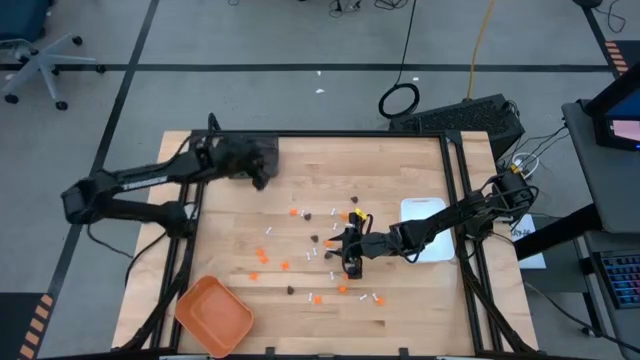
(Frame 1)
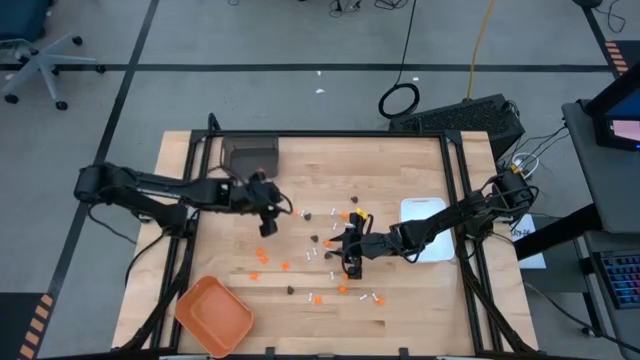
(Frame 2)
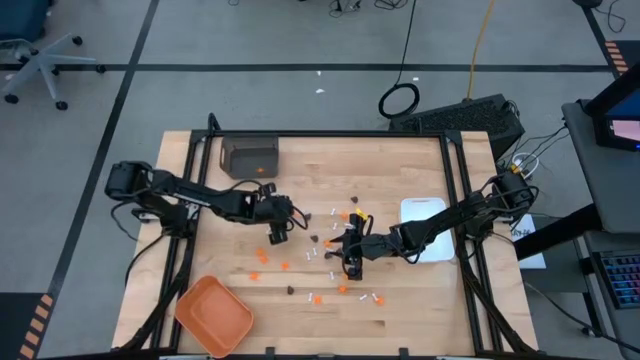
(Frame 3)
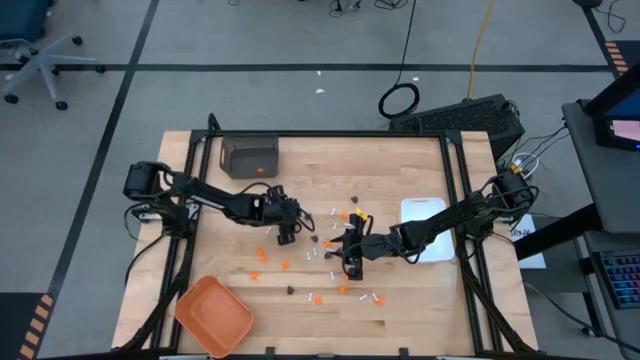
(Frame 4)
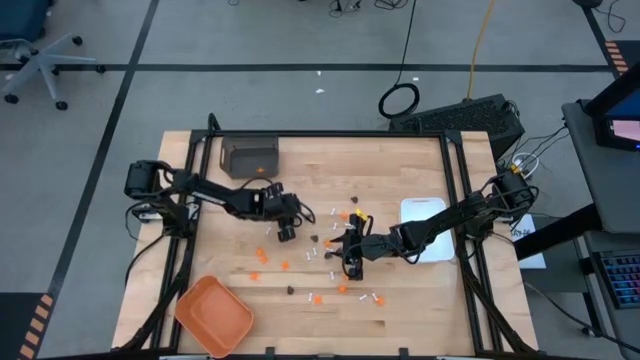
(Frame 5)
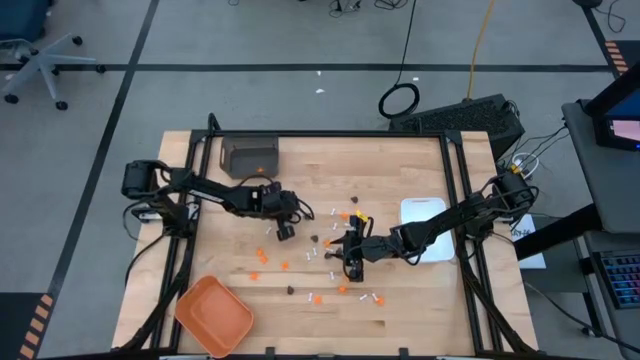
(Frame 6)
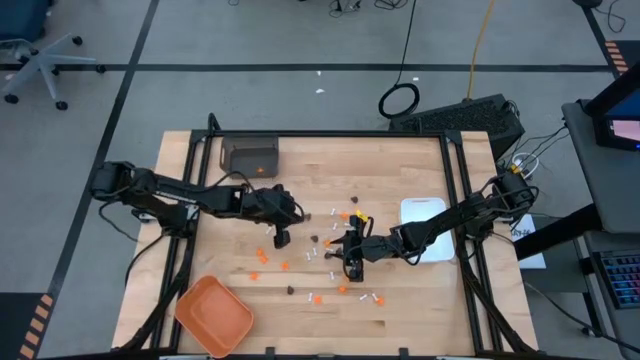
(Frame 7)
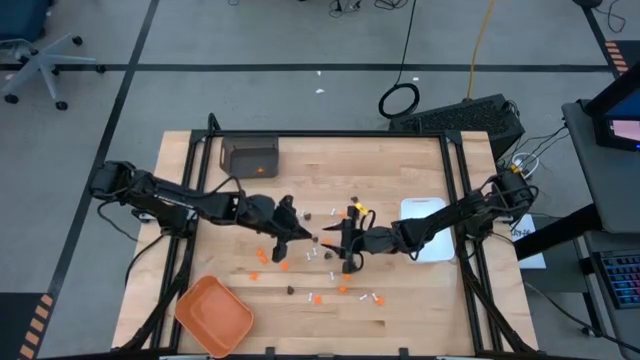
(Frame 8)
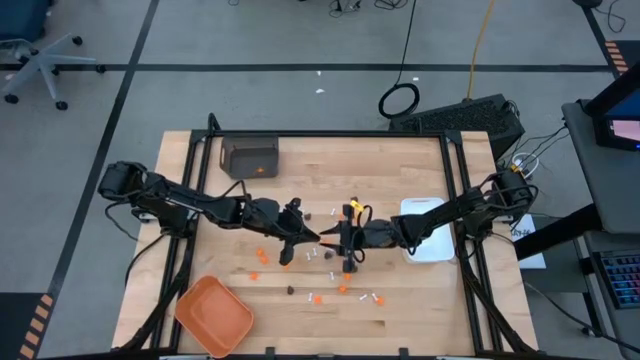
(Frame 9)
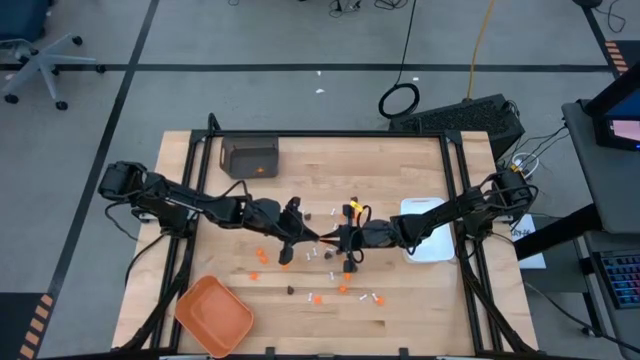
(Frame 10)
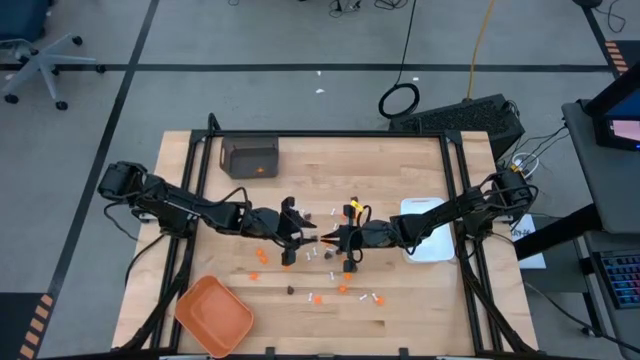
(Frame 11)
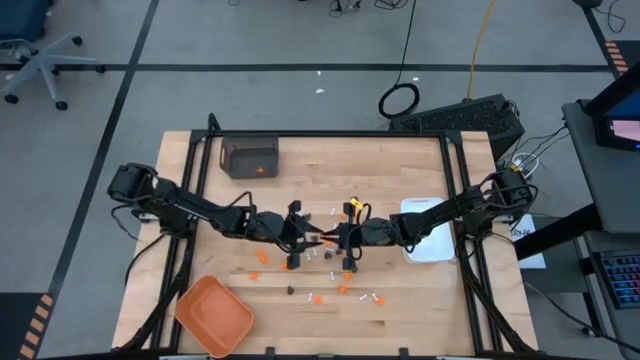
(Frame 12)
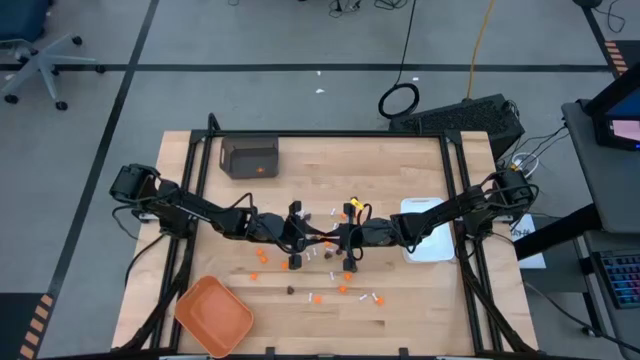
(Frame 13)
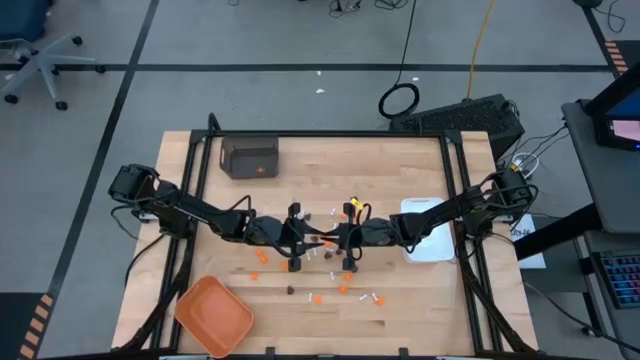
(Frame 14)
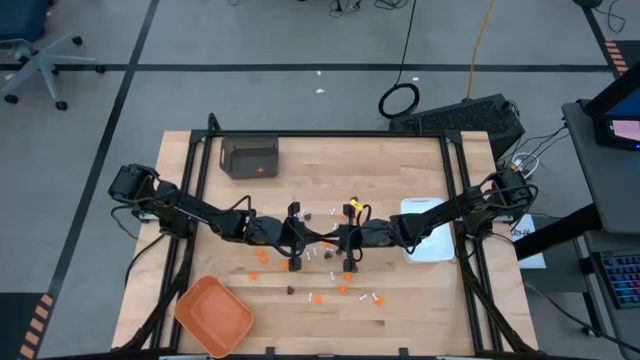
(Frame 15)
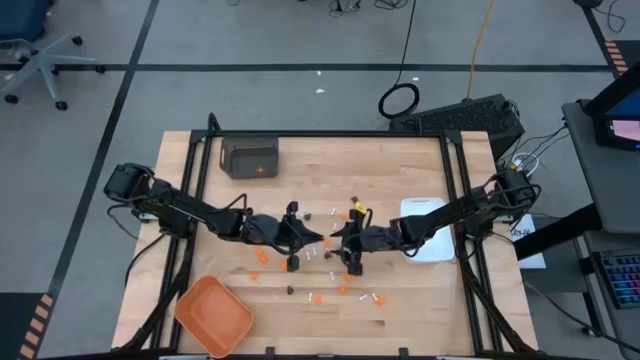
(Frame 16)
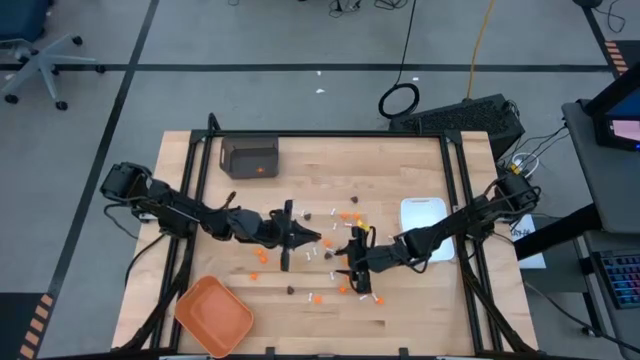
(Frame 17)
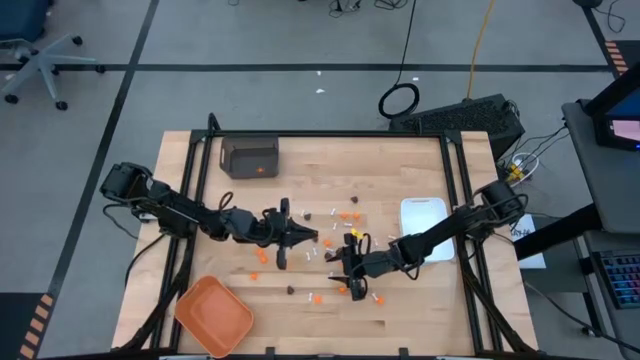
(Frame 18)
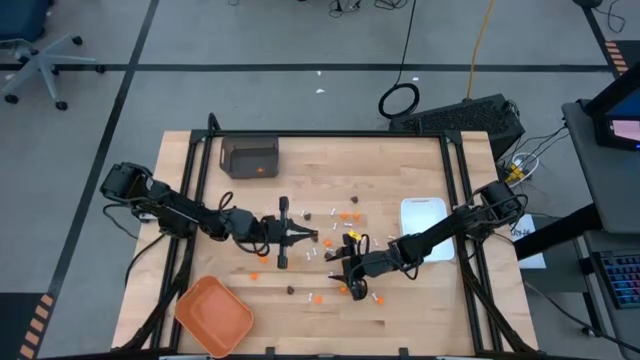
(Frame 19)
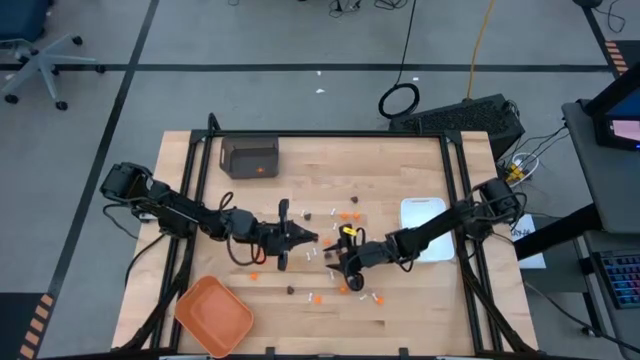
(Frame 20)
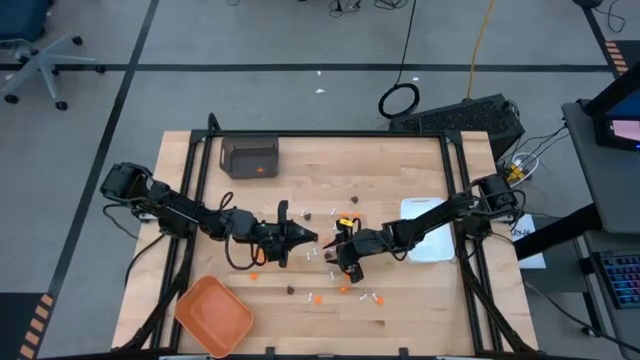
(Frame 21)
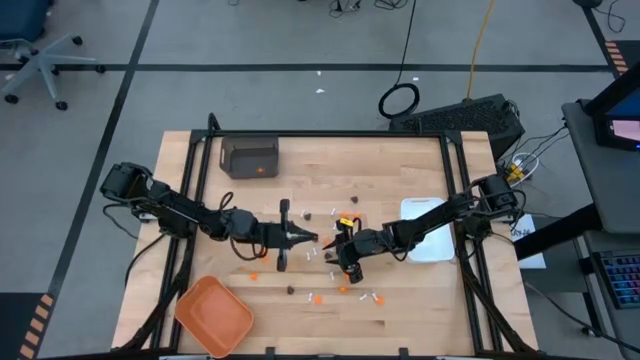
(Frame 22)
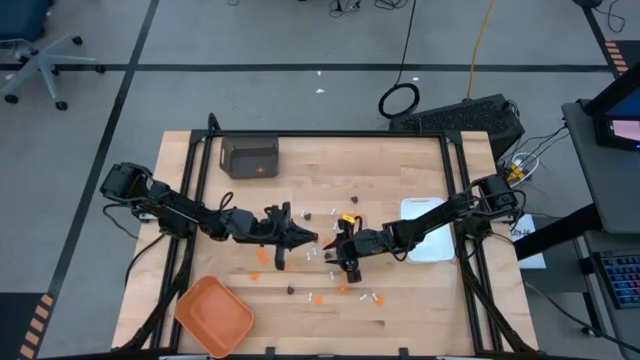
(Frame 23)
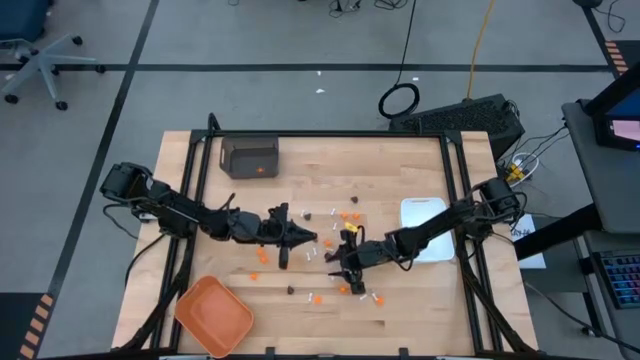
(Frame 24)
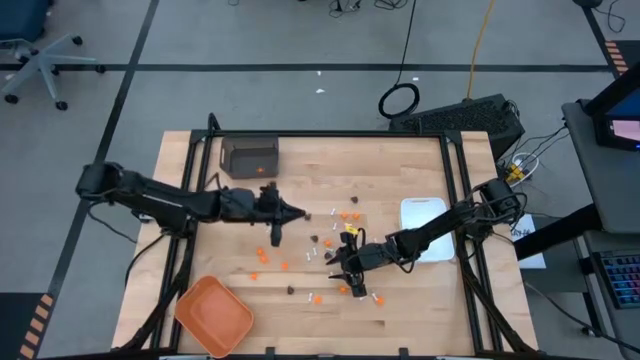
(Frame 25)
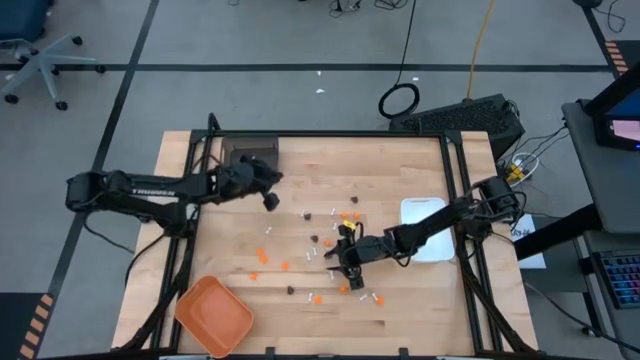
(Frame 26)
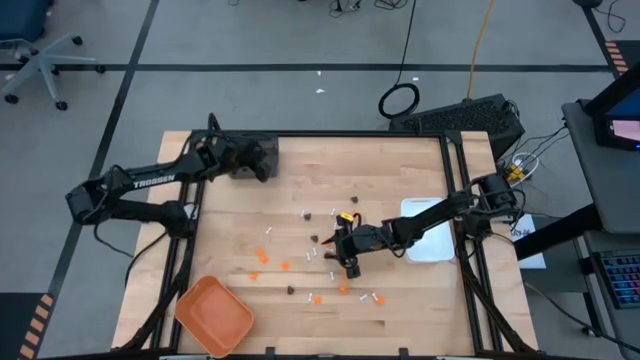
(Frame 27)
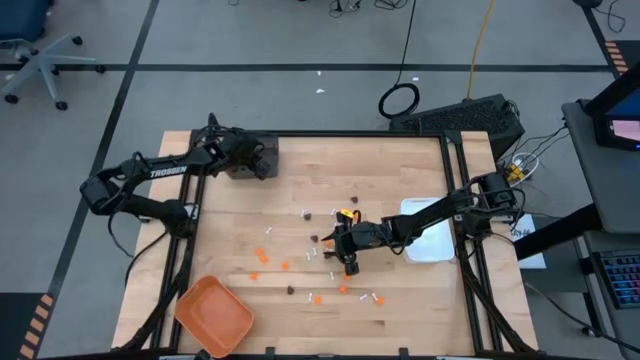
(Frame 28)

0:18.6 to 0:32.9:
Task: Sort Halloween decoration
Put the orange spider toy into the black bin

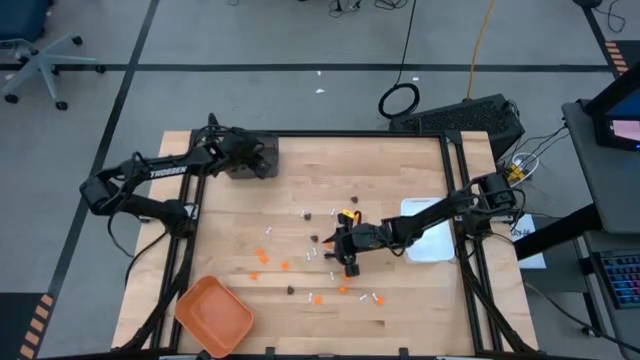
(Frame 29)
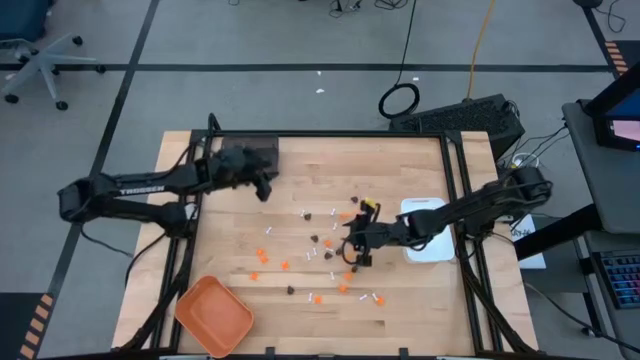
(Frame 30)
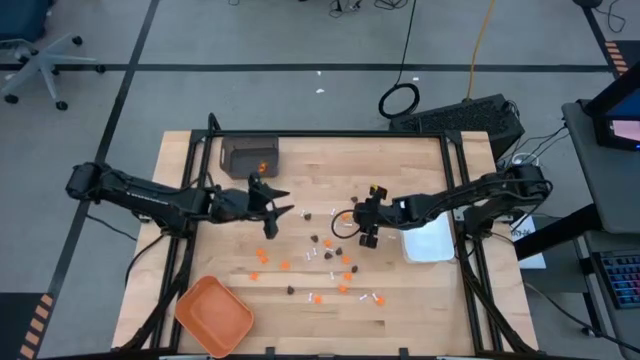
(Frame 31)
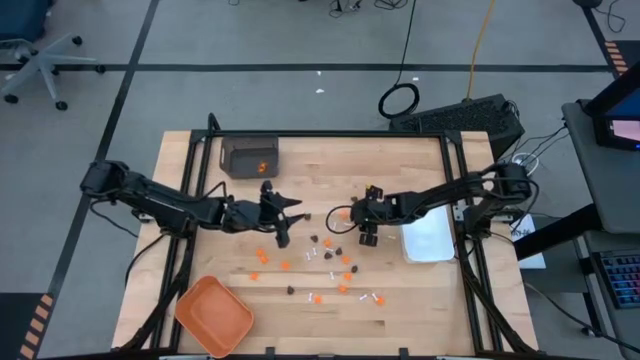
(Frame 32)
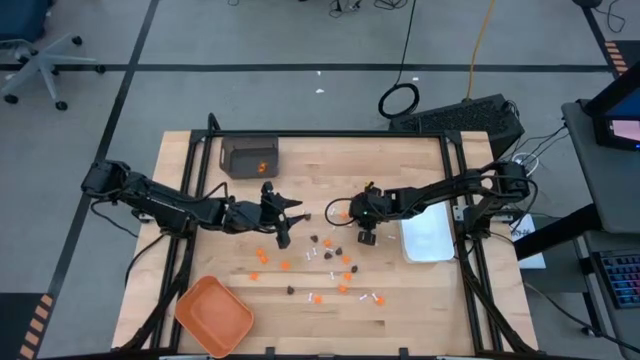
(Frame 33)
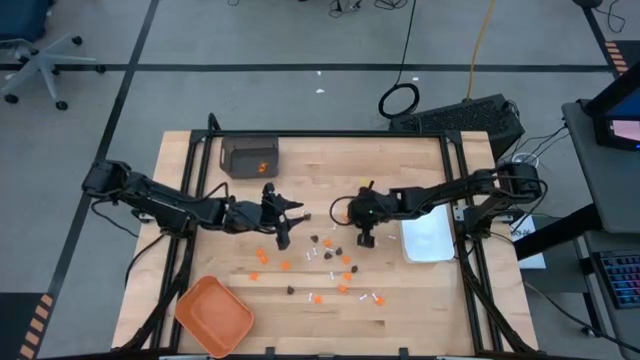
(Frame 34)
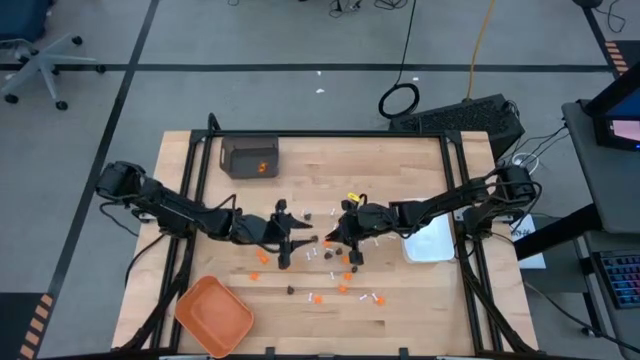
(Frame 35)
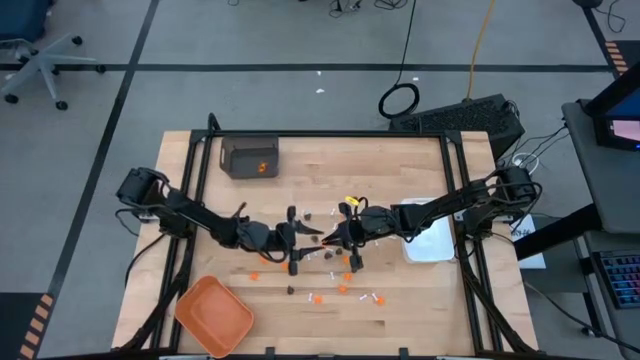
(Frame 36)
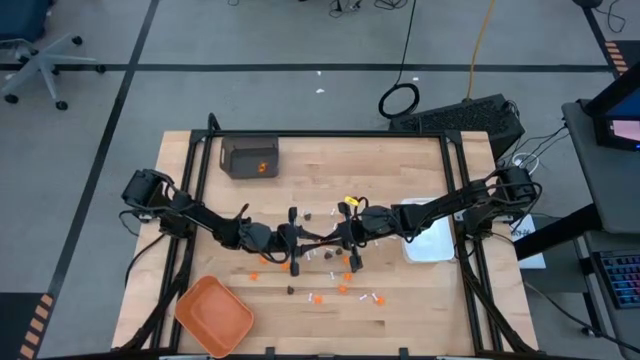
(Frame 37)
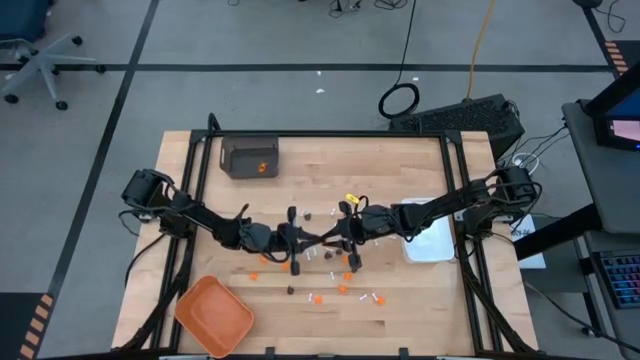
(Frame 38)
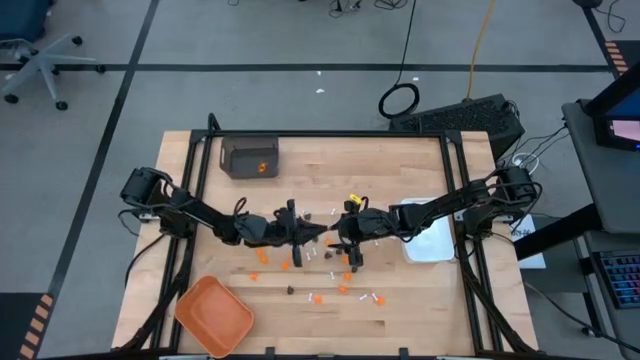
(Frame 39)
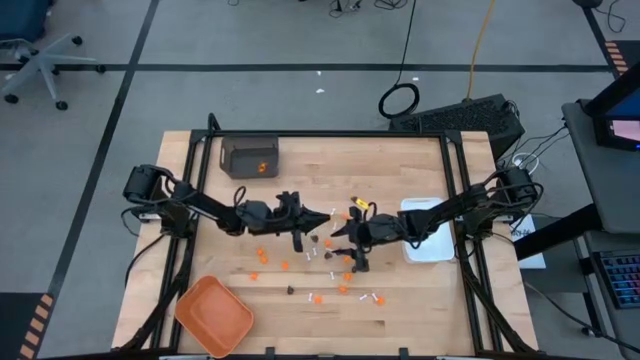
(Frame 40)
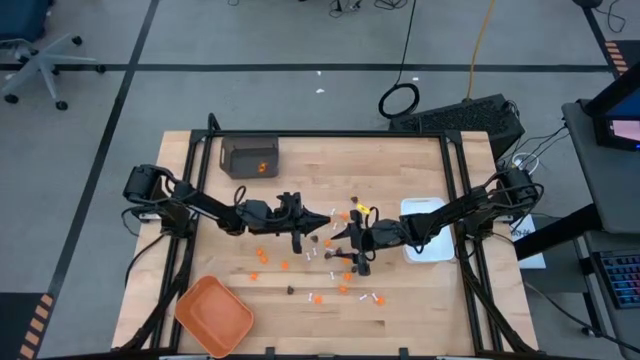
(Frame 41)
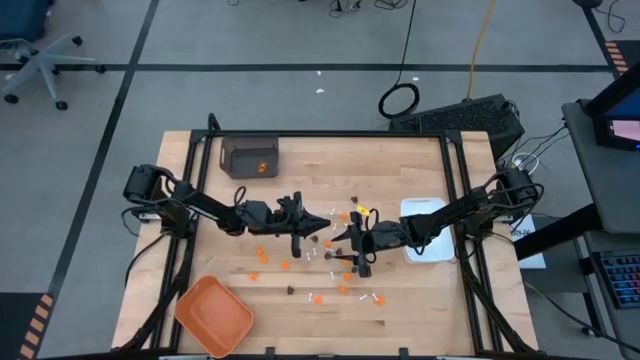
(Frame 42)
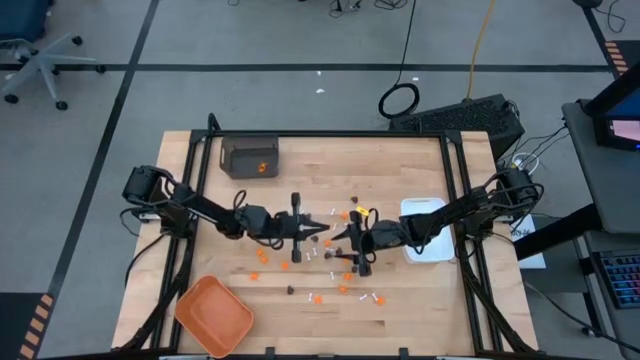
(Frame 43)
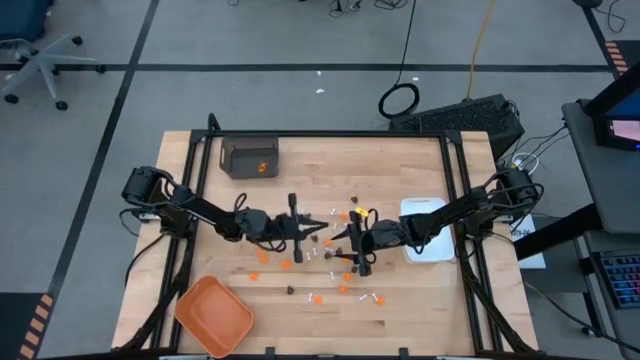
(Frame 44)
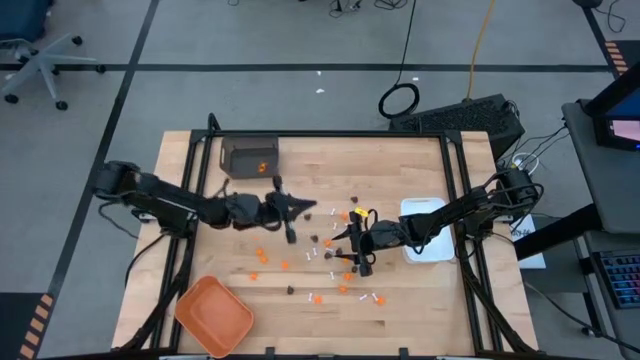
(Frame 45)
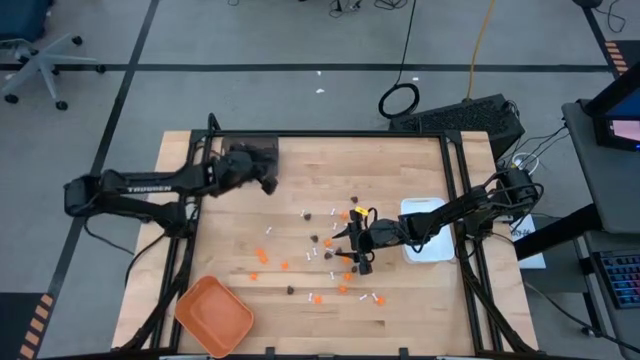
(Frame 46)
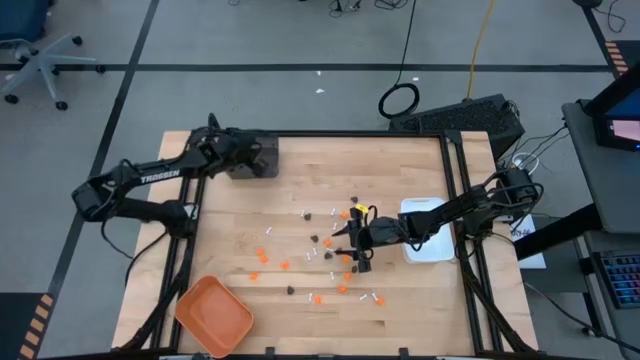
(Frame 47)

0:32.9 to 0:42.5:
Put the orange spider toy into the black bin
